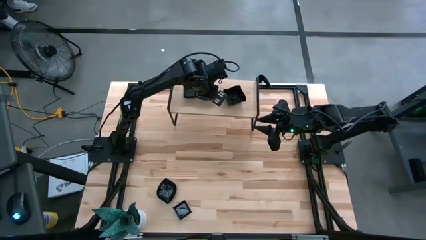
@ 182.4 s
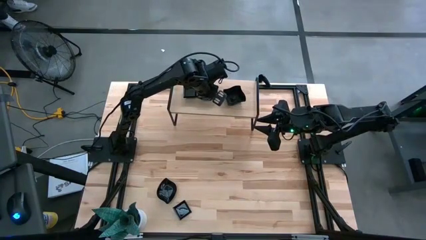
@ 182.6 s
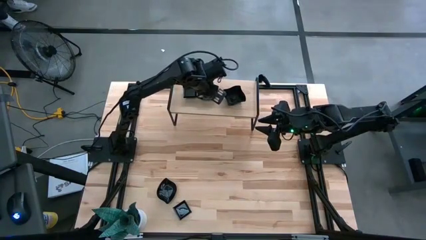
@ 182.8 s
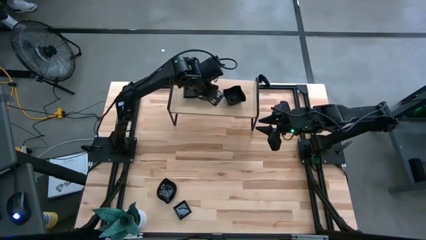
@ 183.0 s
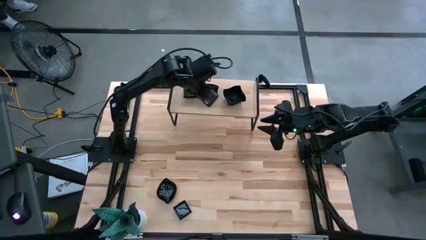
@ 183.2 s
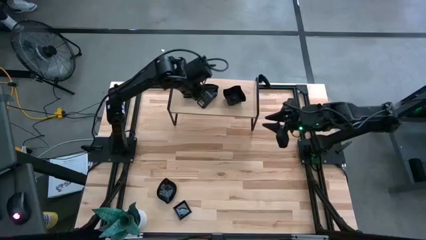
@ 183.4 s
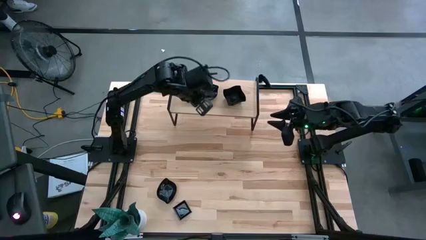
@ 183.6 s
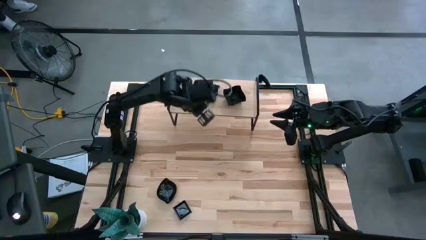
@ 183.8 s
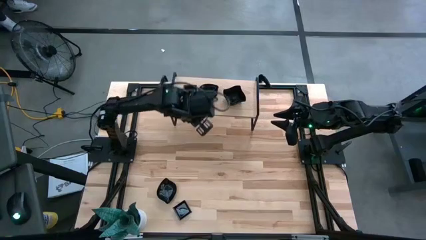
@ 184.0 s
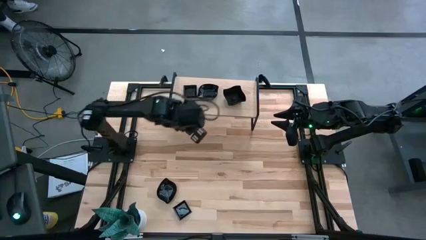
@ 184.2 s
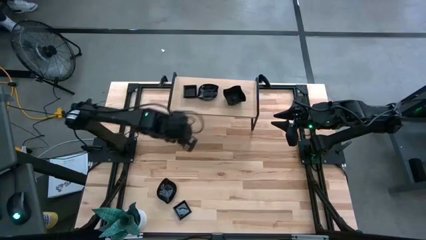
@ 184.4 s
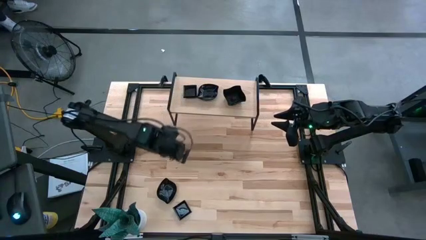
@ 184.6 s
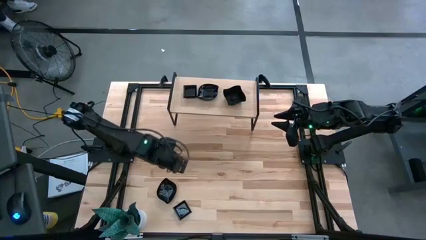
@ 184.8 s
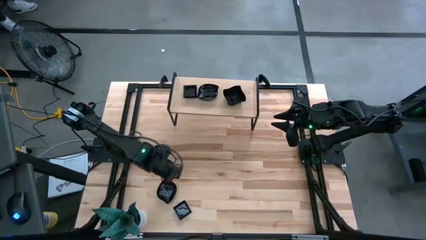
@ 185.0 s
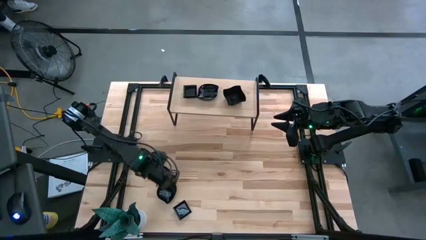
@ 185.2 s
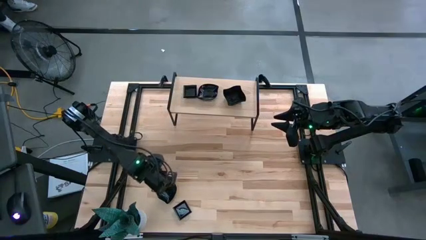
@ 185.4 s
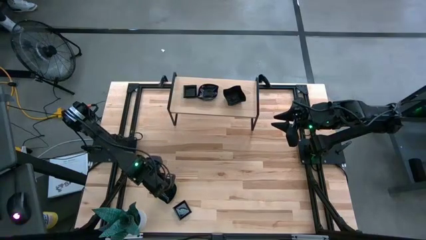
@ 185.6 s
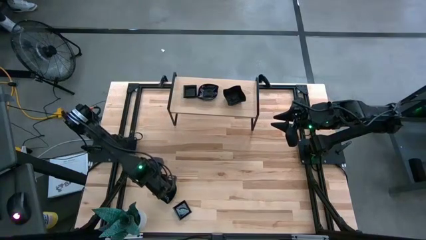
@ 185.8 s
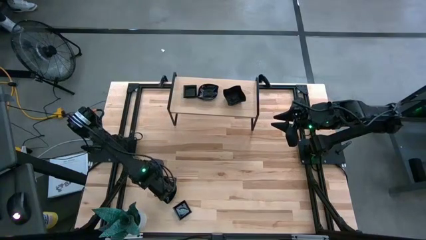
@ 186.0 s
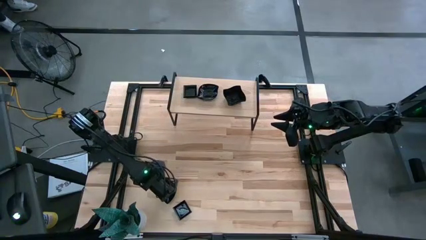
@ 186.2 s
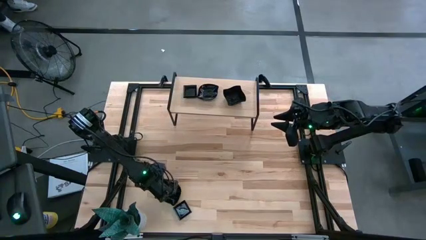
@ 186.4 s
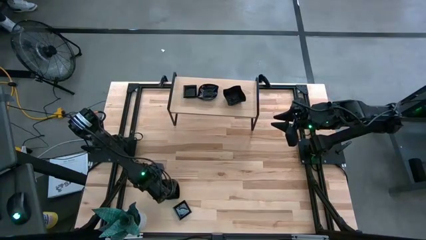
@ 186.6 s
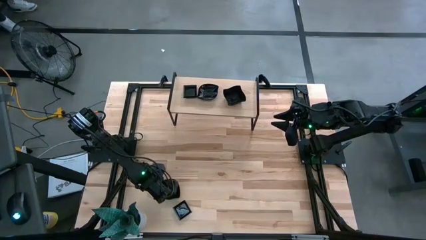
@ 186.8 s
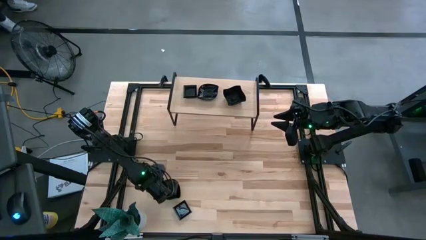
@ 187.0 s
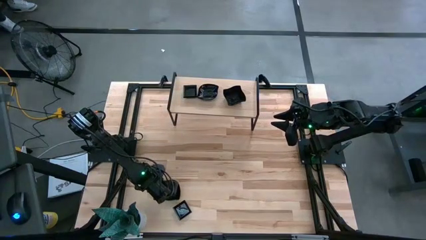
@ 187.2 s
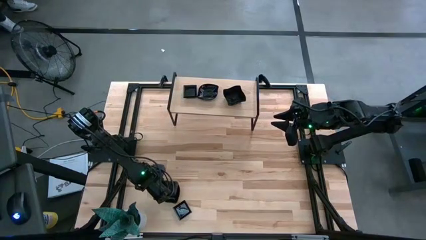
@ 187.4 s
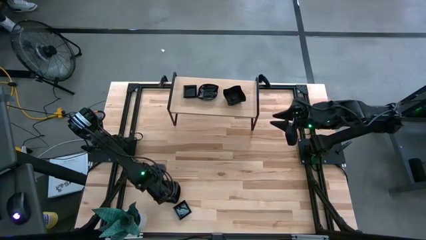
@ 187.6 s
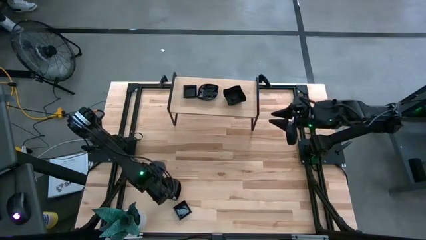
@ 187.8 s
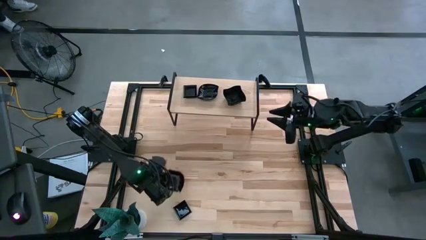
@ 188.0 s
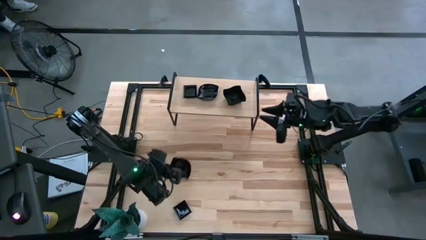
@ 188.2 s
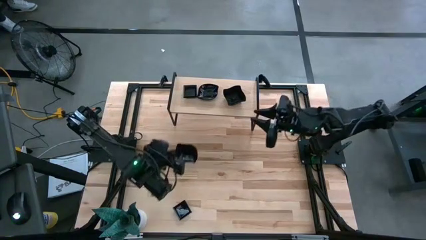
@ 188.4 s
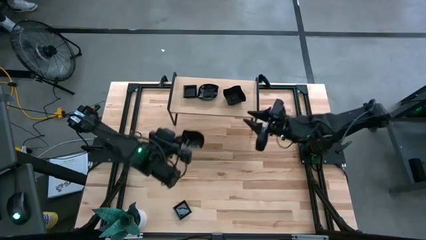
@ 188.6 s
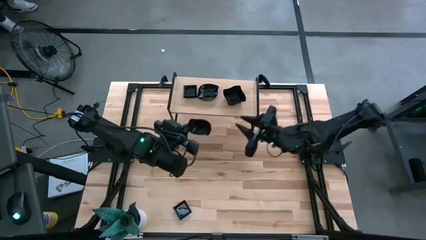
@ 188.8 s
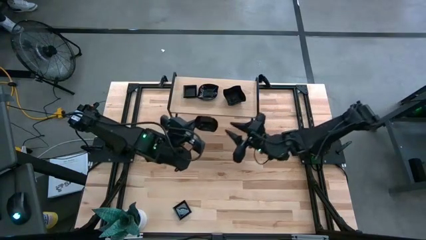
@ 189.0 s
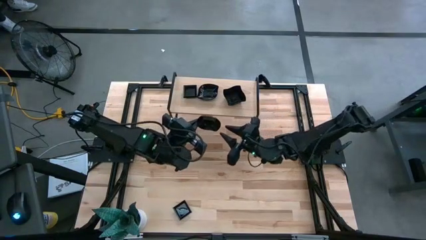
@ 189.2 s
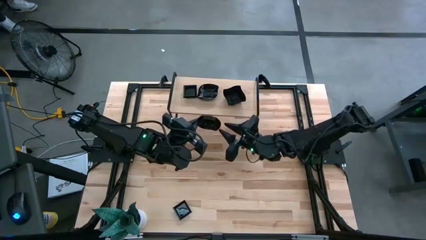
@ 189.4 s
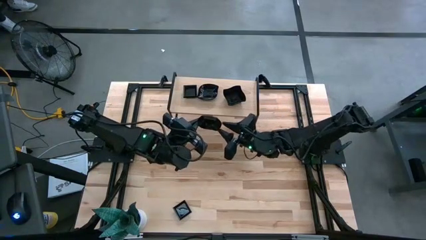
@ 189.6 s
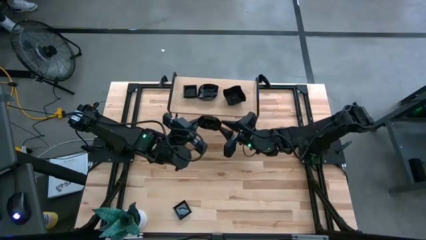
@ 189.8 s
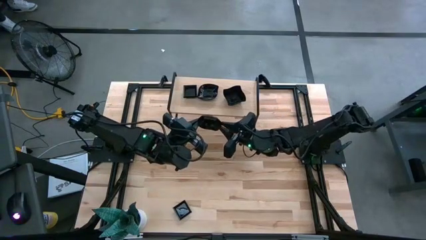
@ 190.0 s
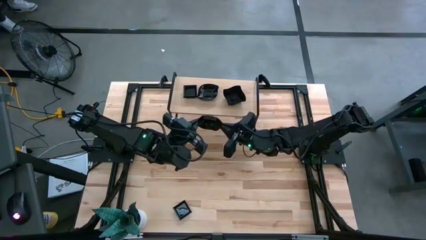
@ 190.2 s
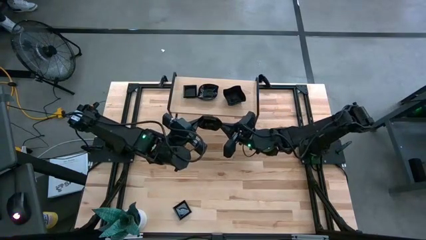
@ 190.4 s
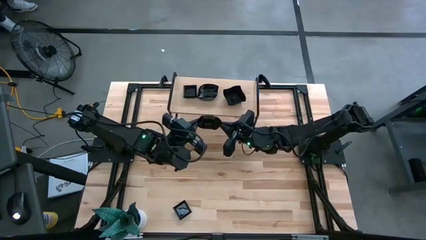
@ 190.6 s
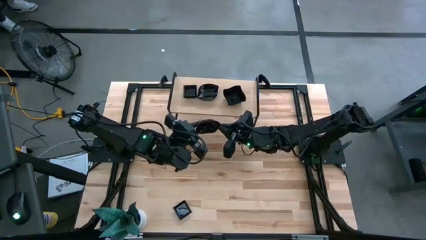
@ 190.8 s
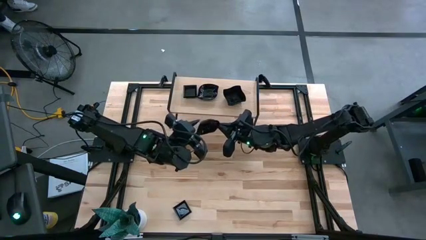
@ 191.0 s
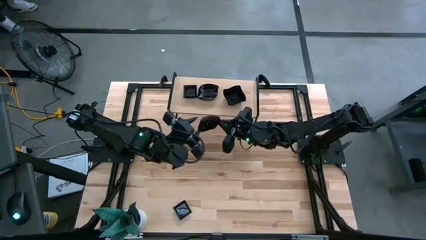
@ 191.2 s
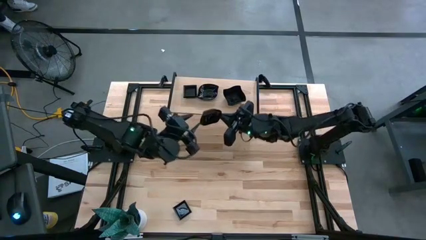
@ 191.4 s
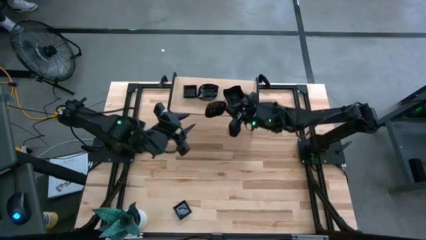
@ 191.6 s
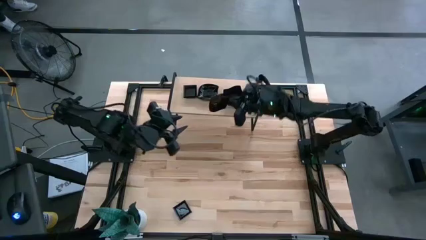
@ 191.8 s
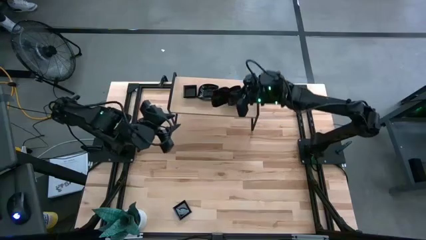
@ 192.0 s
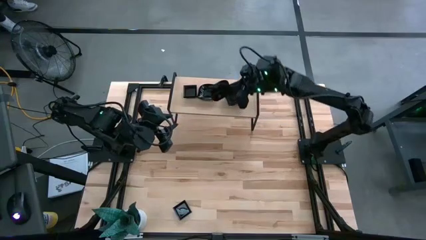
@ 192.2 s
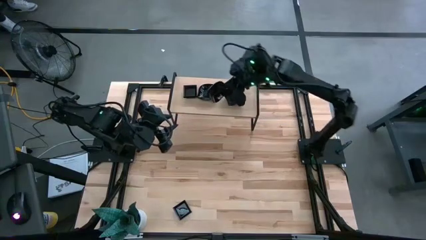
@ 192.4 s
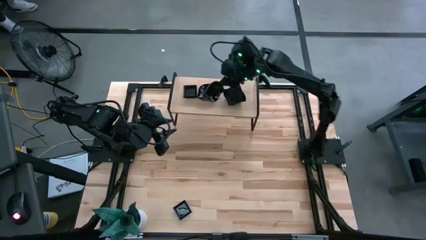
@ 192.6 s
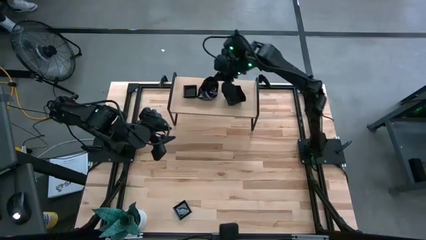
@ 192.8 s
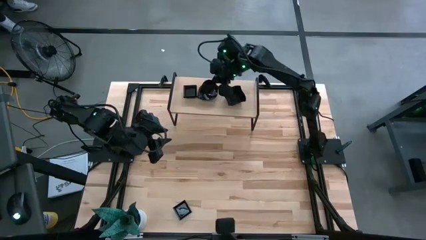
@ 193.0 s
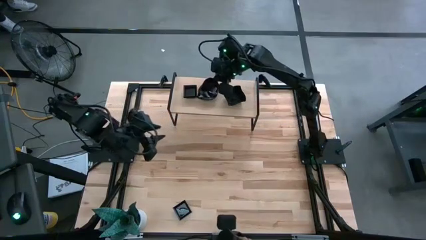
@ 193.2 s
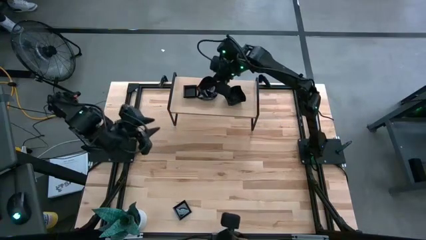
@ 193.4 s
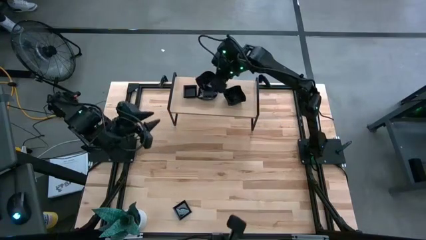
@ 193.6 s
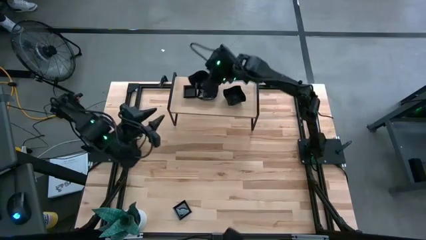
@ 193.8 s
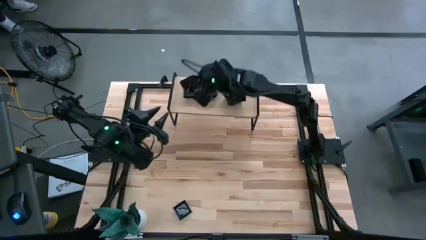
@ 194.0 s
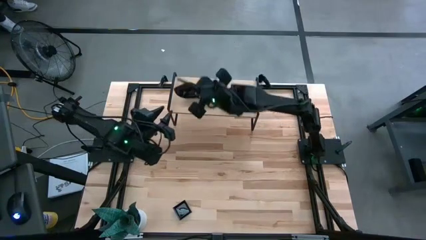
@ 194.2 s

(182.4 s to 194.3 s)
Task: Pick & Place Mini shaped plates
Stack the leaf-shaped plate on the leaf-shaped plate
